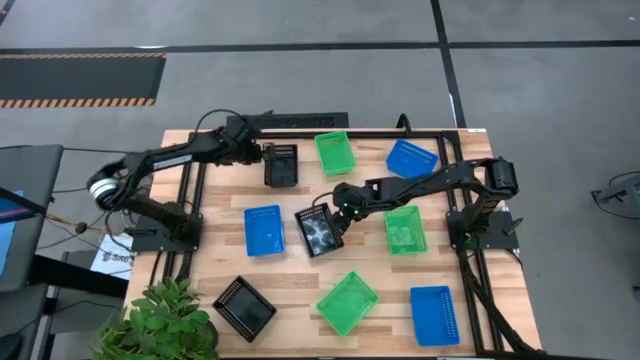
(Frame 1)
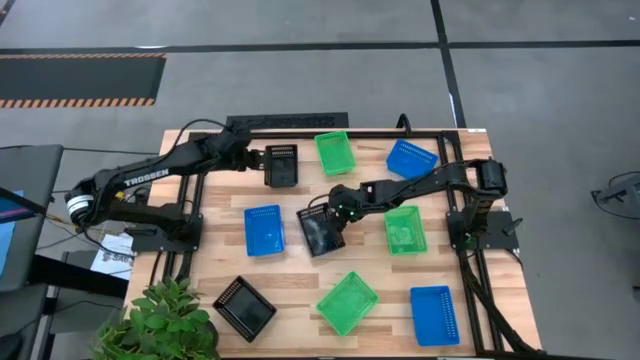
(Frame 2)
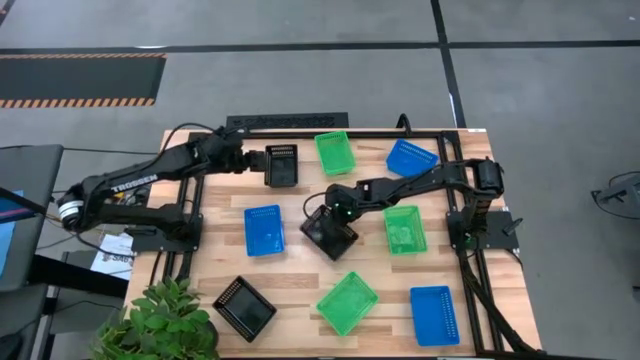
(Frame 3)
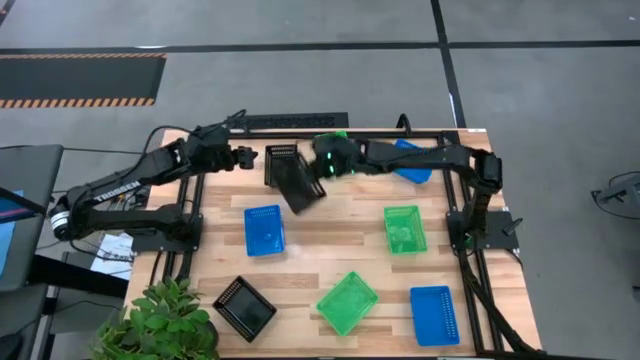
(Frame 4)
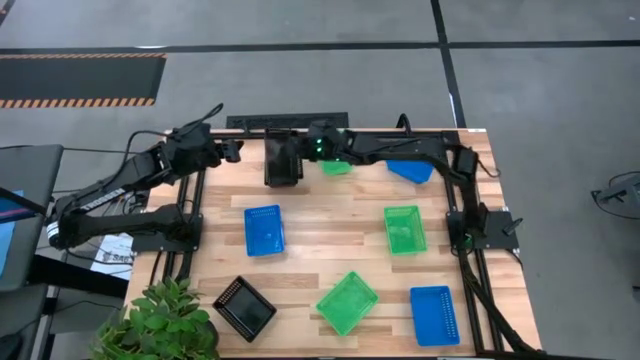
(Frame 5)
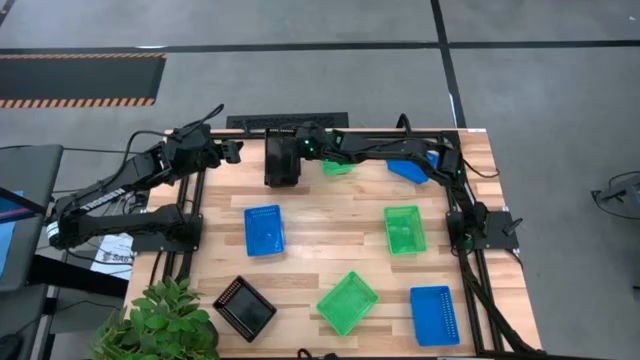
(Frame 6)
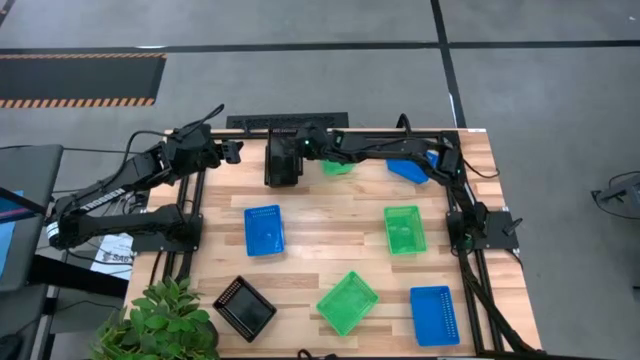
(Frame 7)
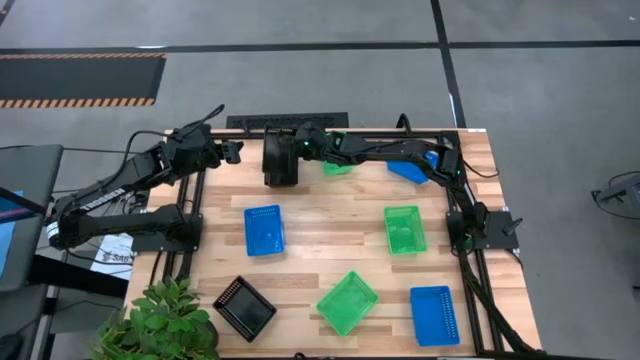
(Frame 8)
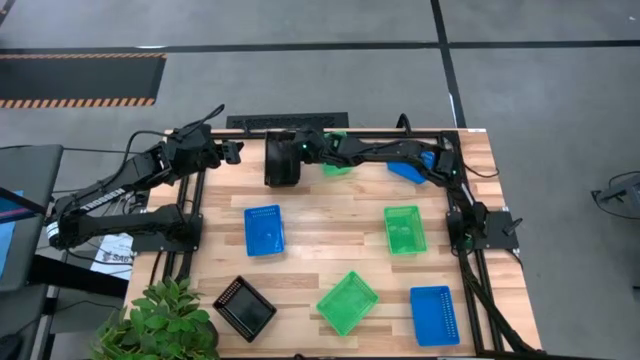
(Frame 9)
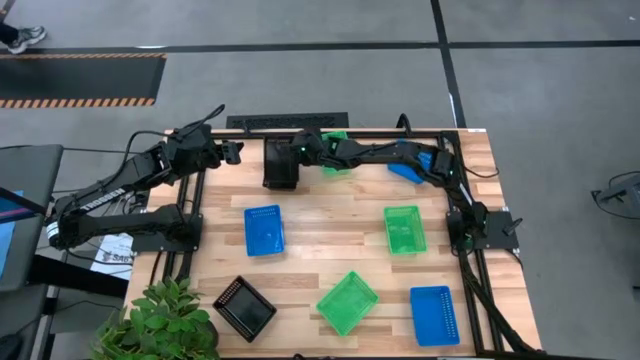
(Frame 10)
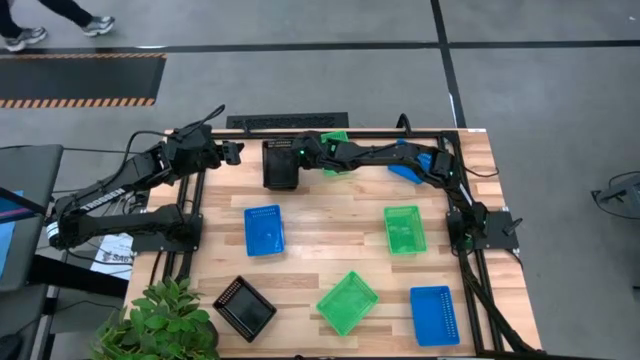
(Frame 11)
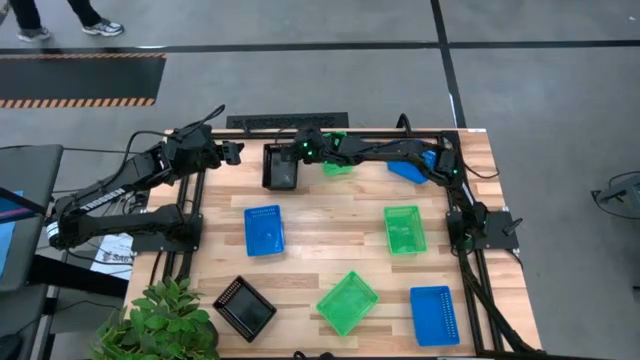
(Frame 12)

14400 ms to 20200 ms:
Stack the middle black bin on the top black bin

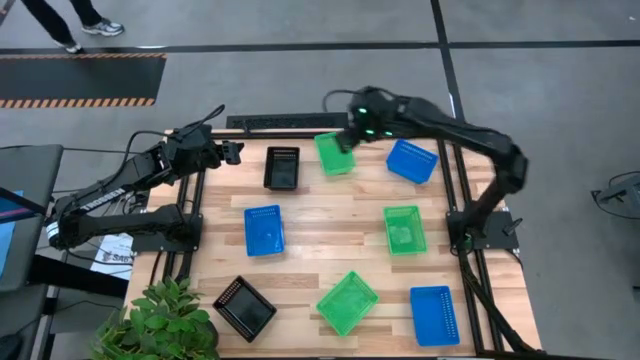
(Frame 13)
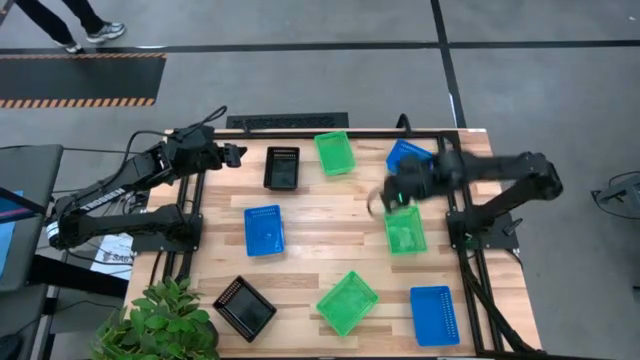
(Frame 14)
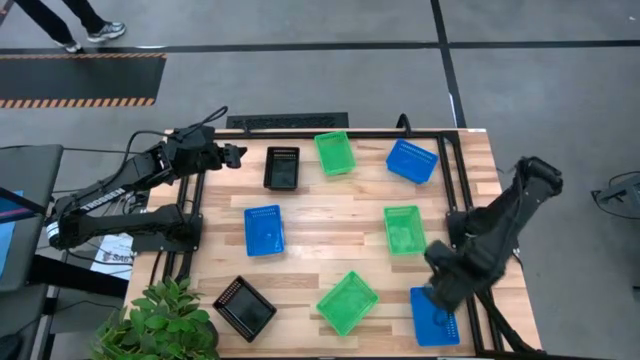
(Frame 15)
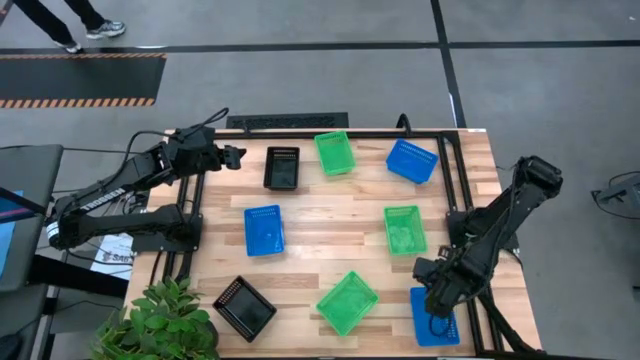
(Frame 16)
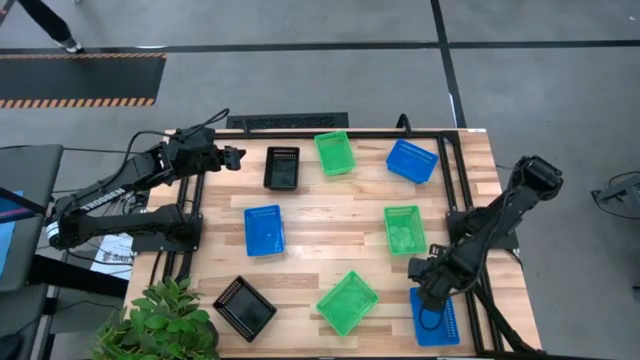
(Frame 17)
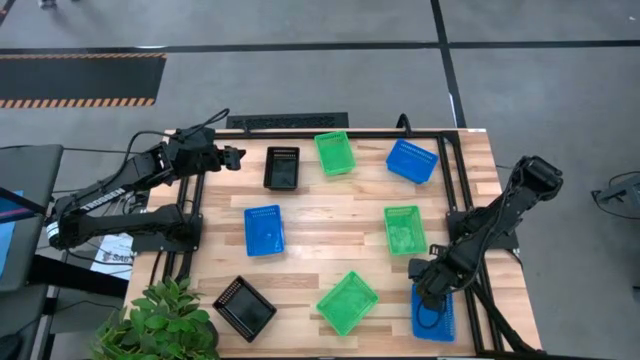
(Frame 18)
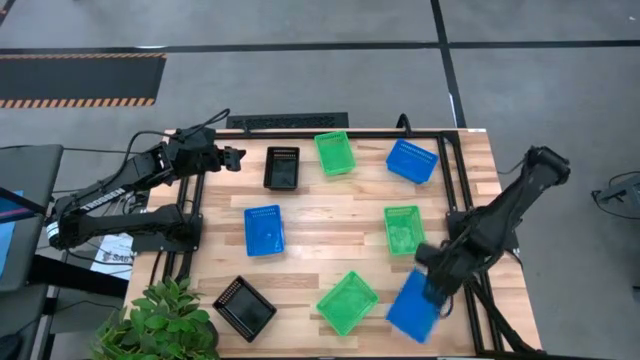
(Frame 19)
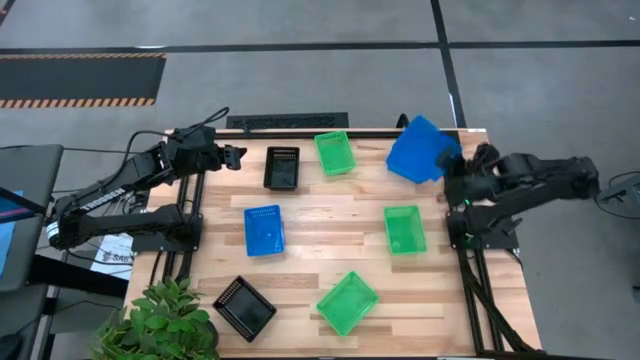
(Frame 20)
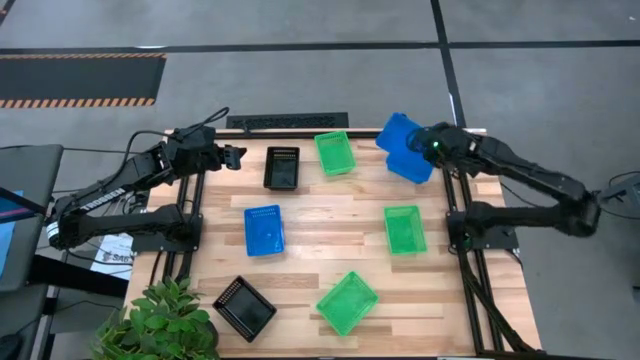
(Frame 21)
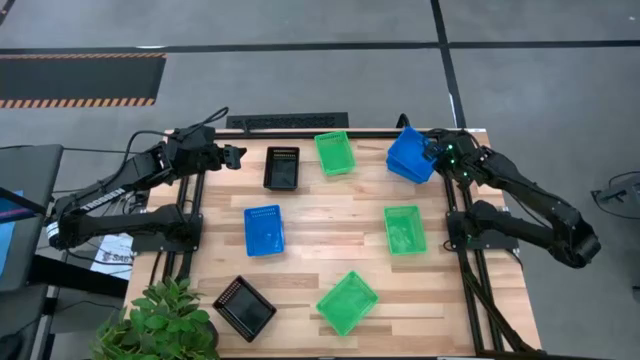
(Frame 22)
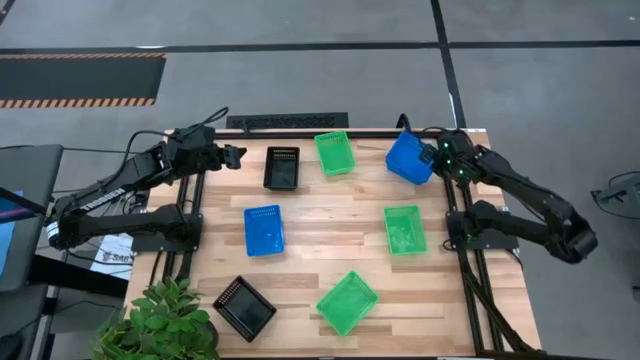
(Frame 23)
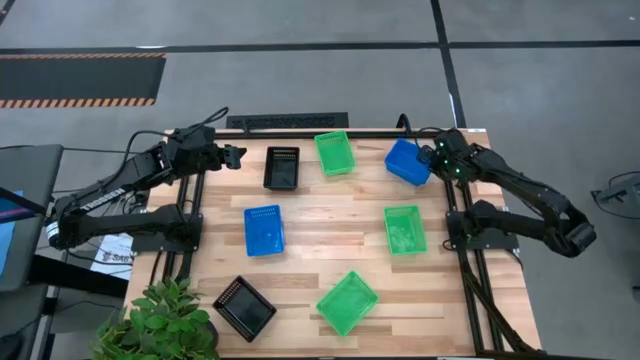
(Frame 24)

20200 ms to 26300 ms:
Stack the bottom right blue bin on the top blue bin

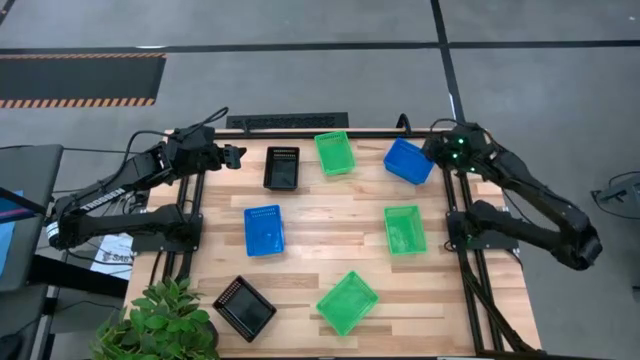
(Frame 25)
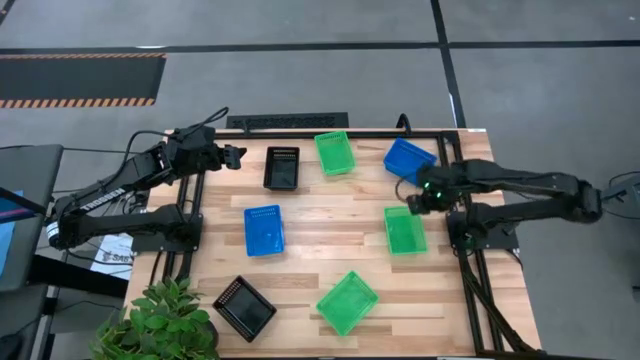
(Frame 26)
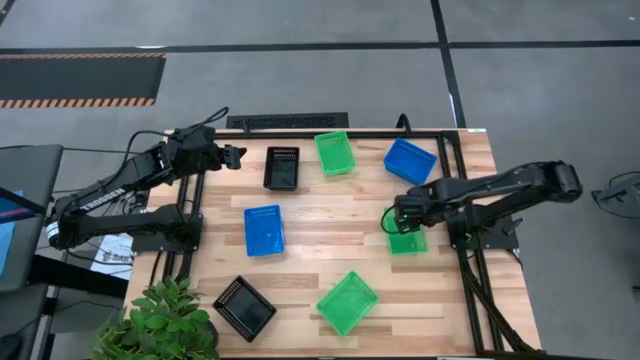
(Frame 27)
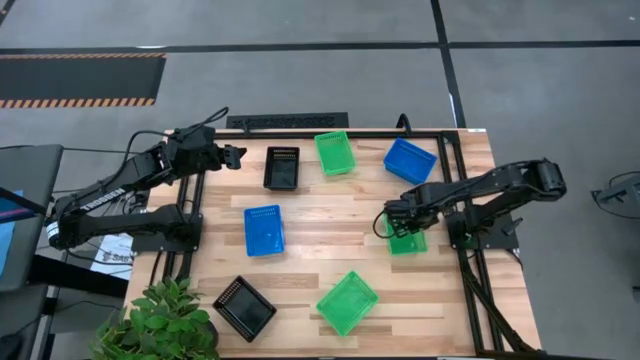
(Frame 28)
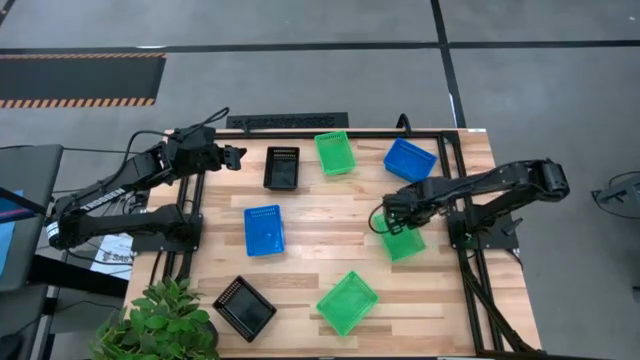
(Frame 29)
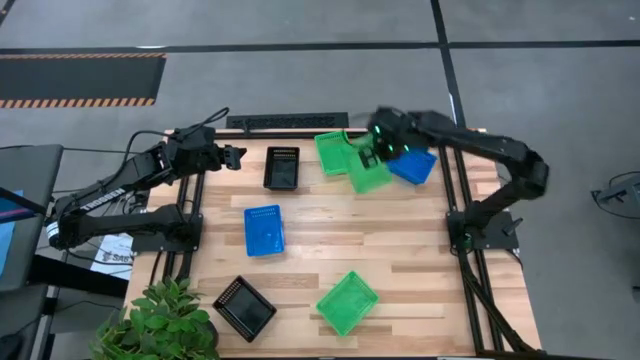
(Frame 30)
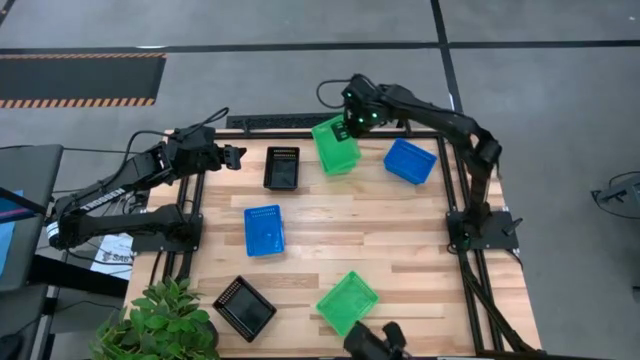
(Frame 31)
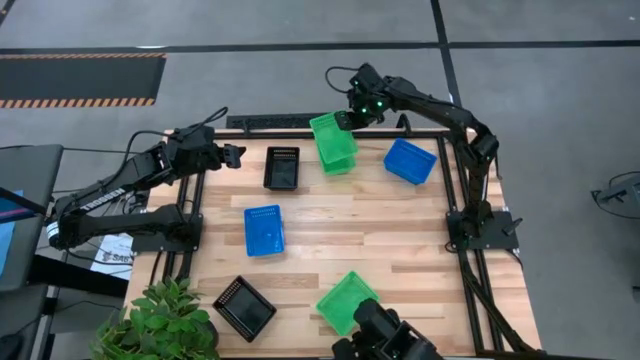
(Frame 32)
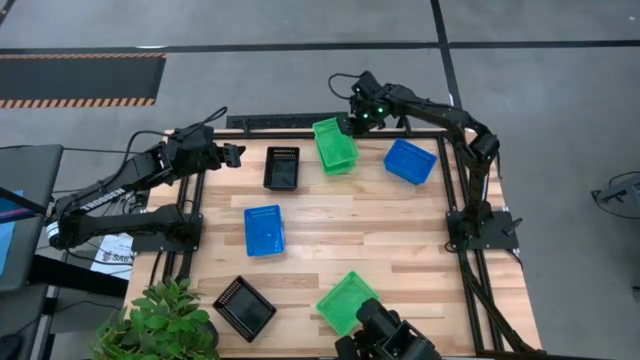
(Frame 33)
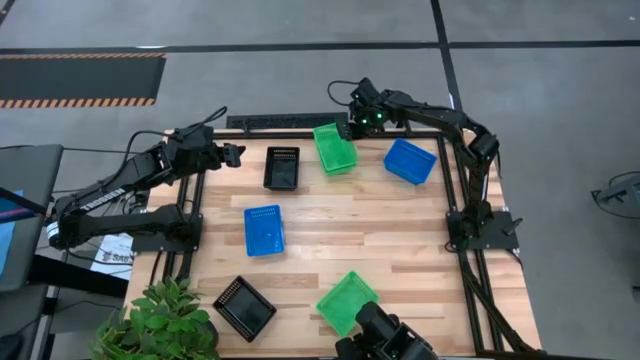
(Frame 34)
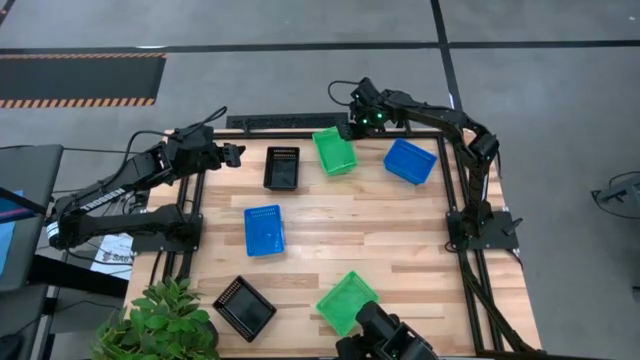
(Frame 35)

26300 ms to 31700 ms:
Stack the middle right green bin on the top green bin

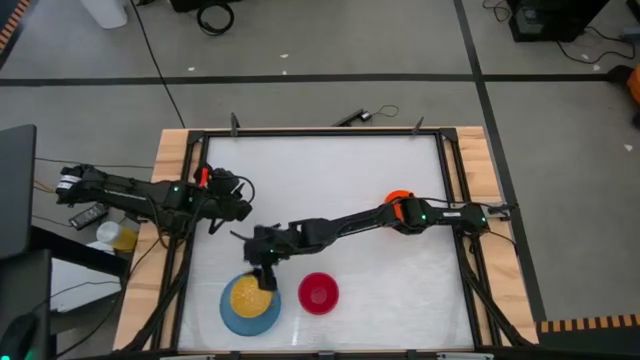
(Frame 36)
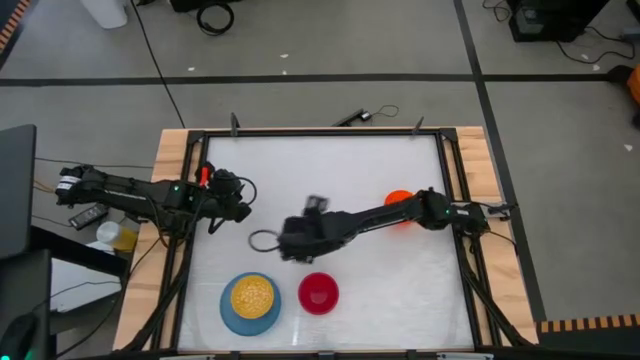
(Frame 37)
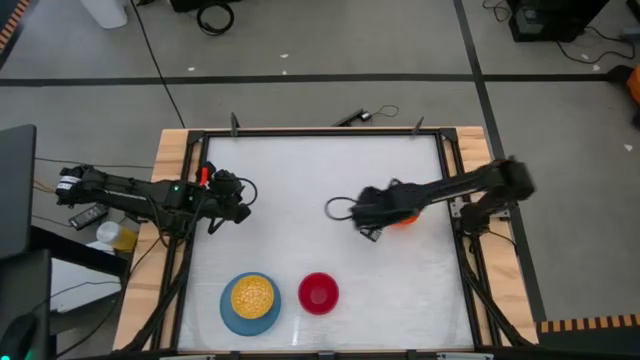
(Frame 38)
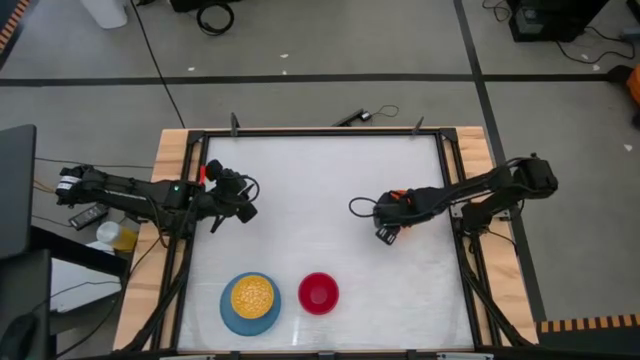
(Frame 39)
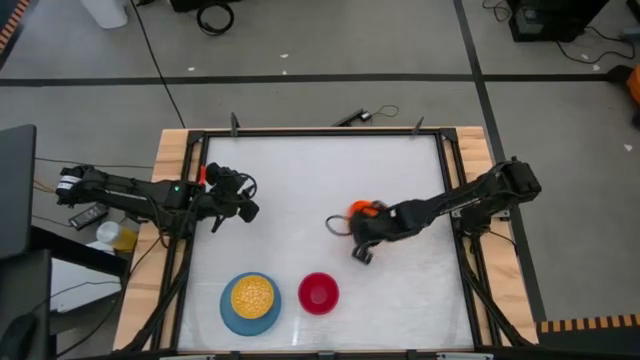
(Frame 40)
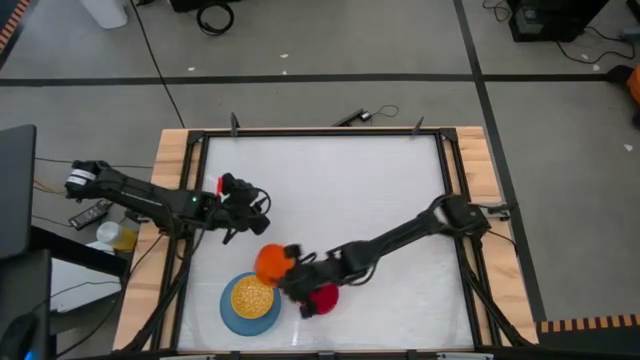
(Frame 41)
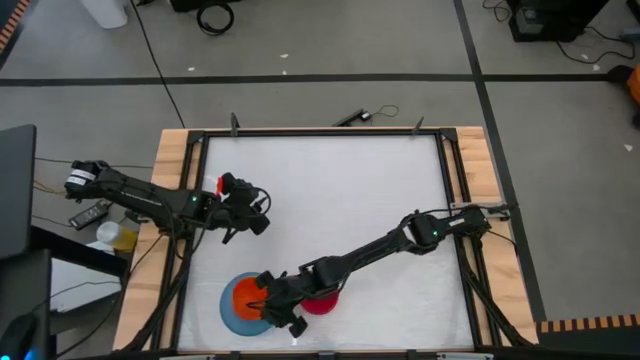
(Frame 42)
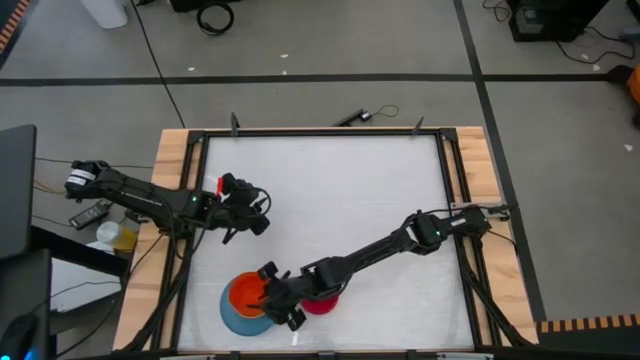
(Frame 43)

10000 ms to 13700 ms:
Stack the orange bowl on top of the yellow bowl
